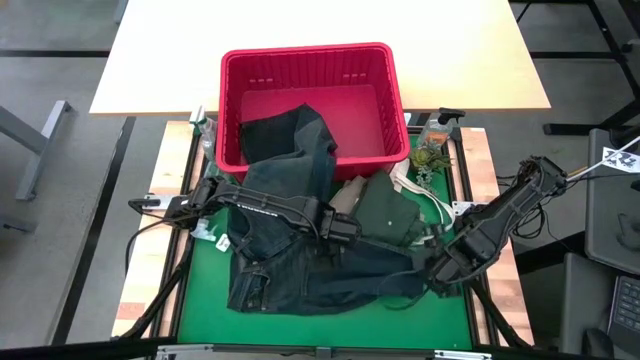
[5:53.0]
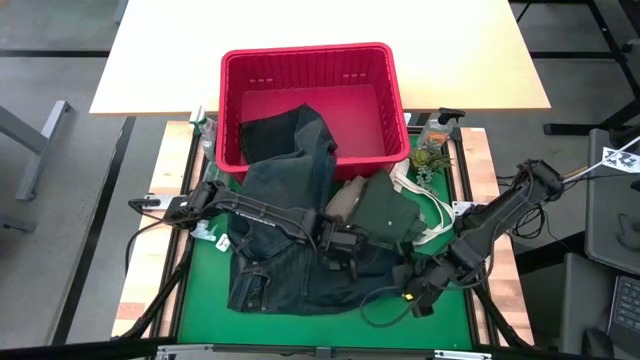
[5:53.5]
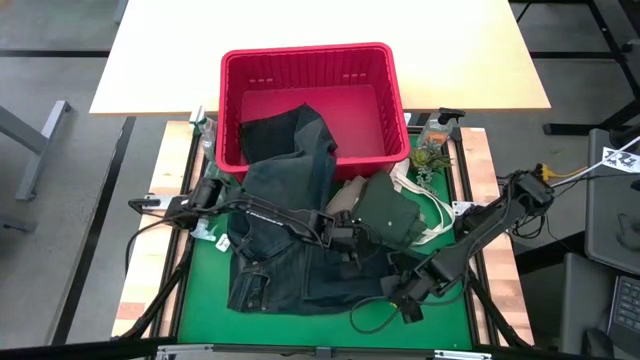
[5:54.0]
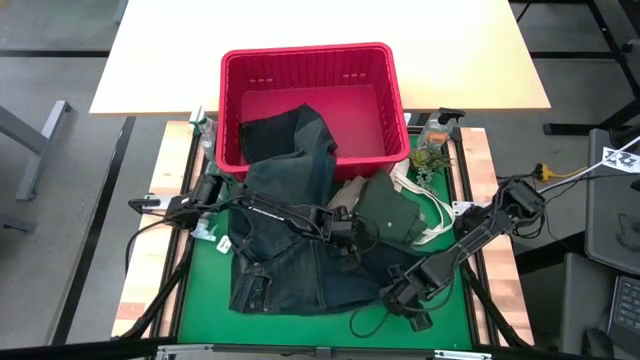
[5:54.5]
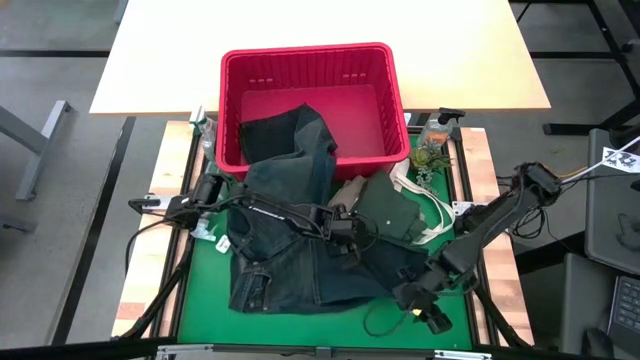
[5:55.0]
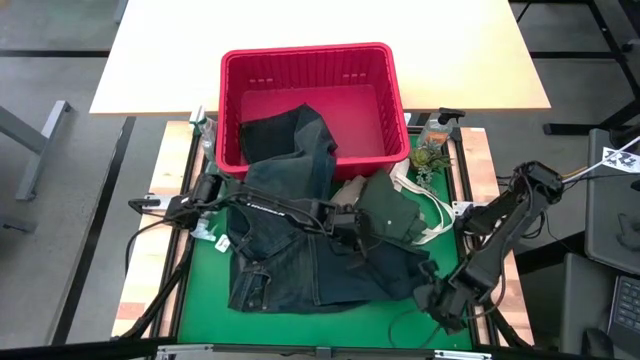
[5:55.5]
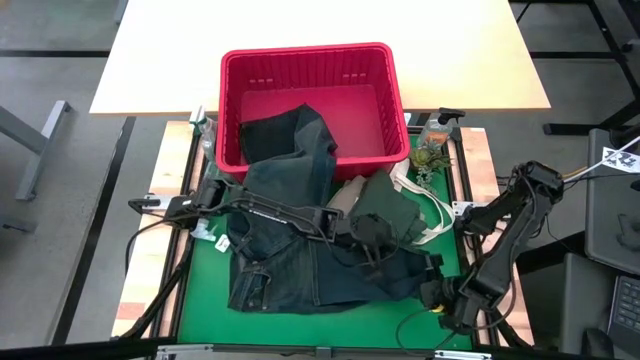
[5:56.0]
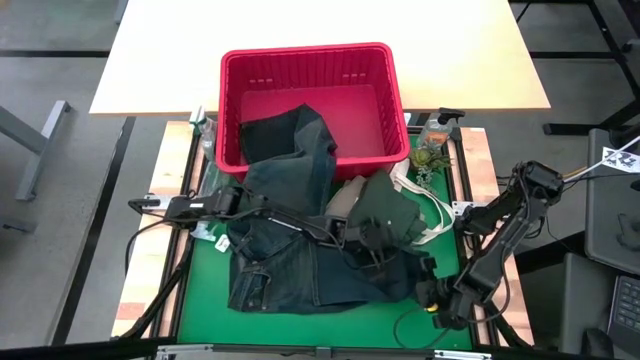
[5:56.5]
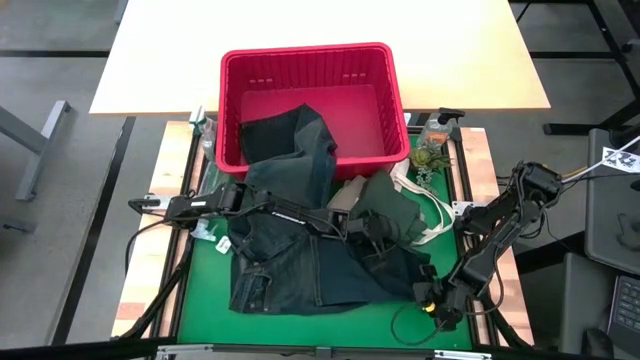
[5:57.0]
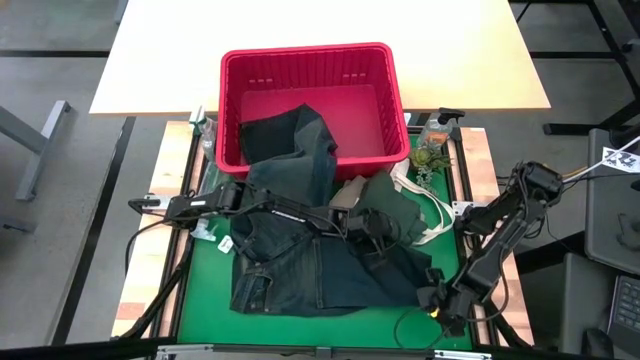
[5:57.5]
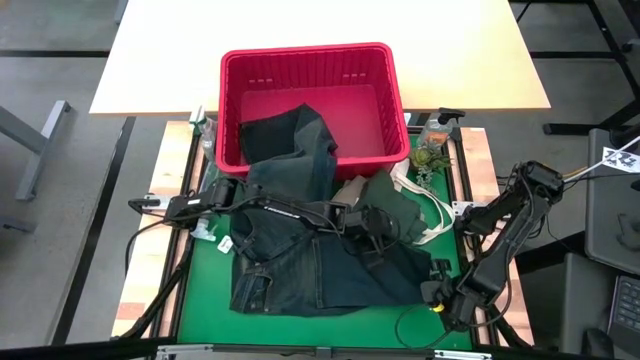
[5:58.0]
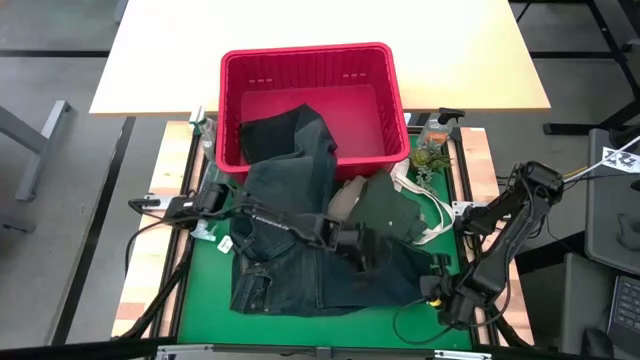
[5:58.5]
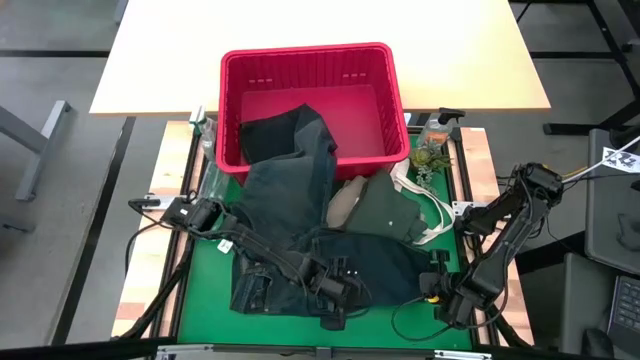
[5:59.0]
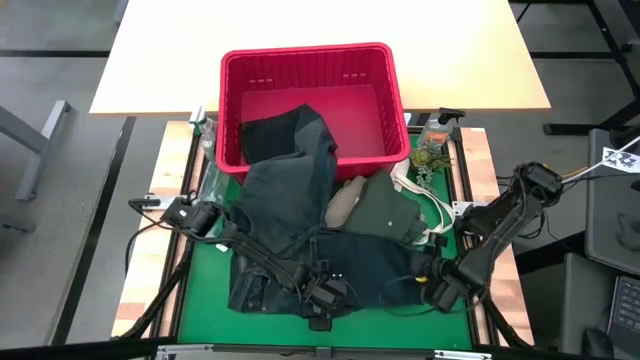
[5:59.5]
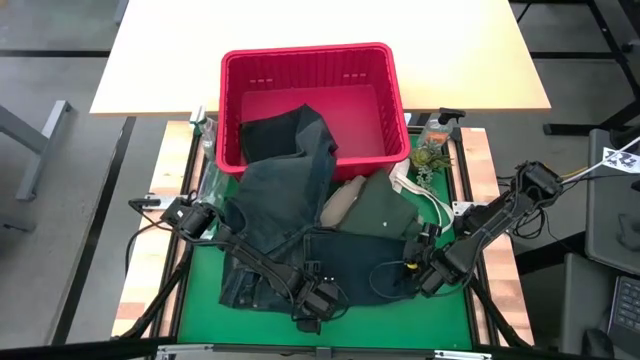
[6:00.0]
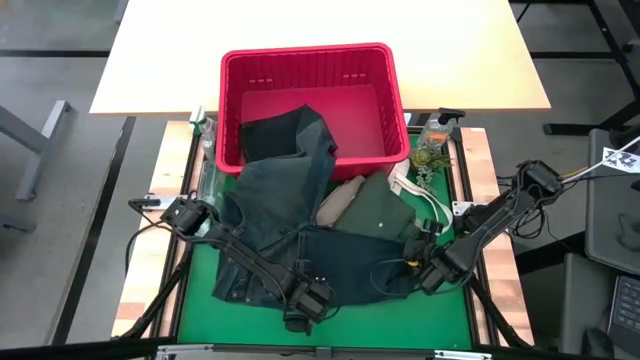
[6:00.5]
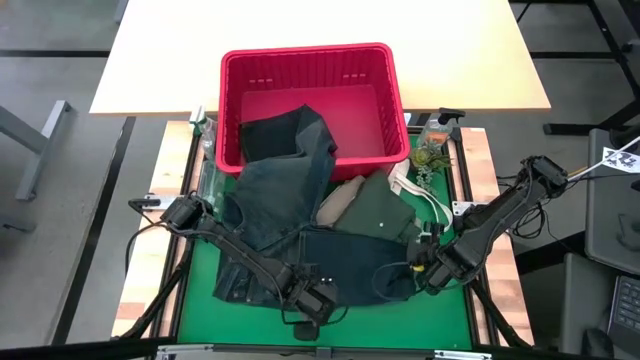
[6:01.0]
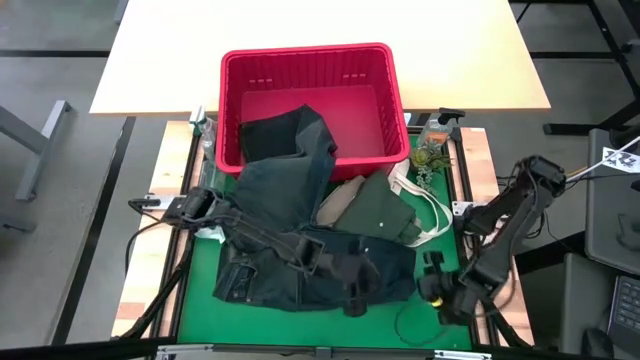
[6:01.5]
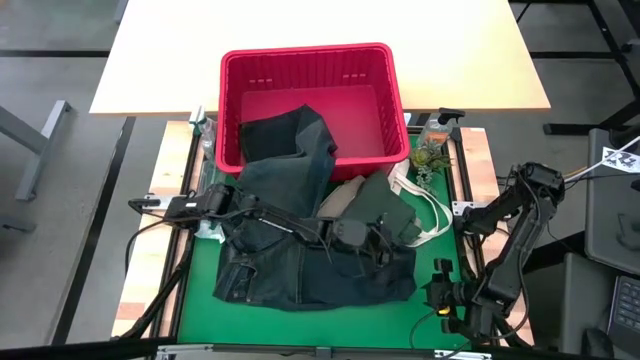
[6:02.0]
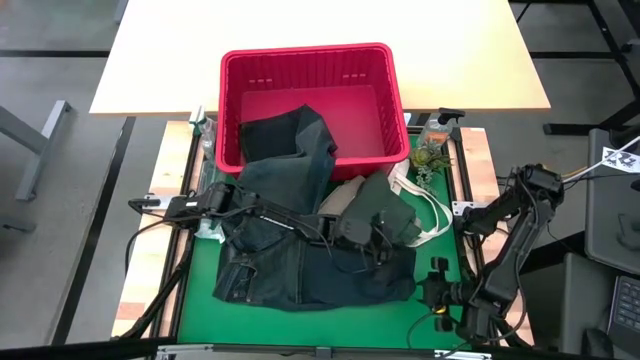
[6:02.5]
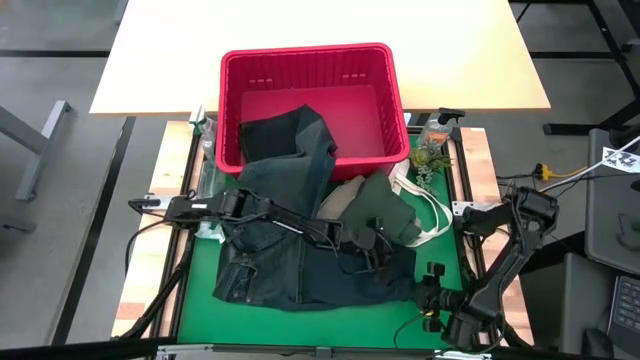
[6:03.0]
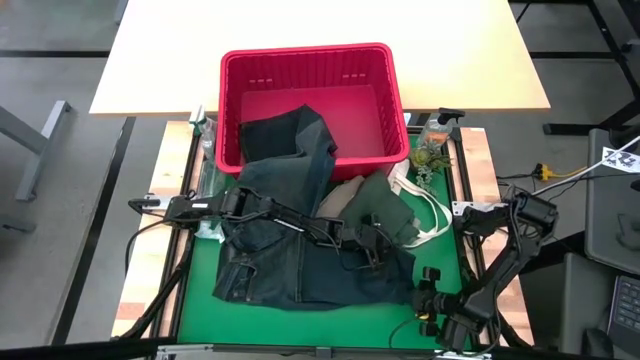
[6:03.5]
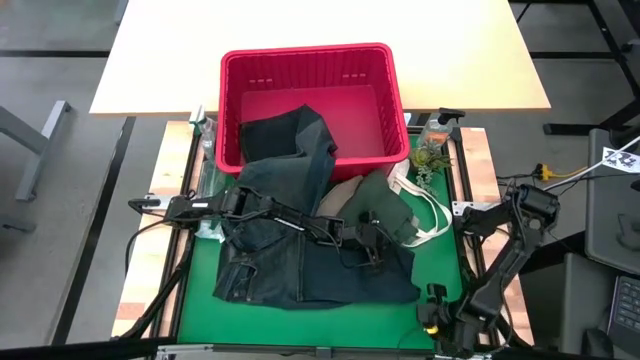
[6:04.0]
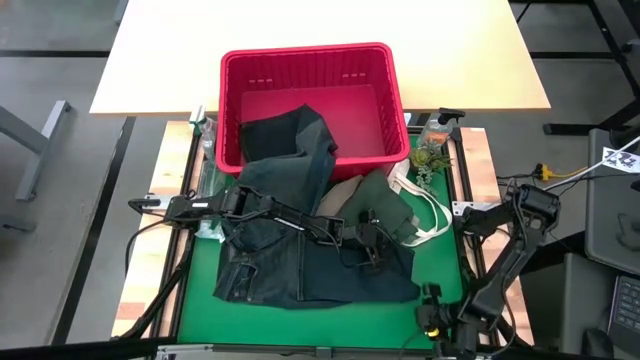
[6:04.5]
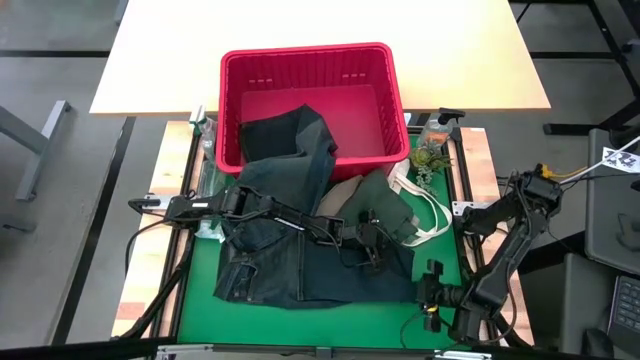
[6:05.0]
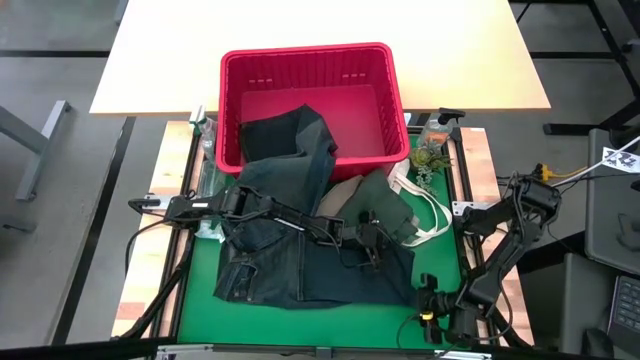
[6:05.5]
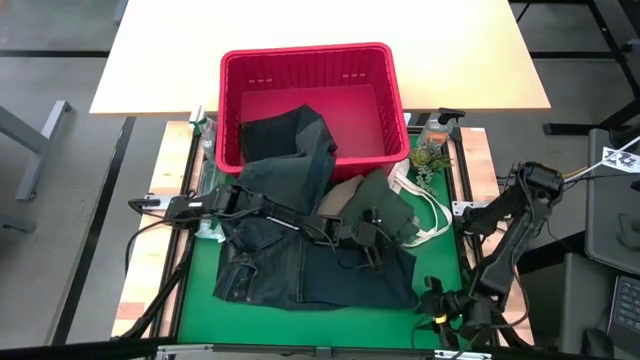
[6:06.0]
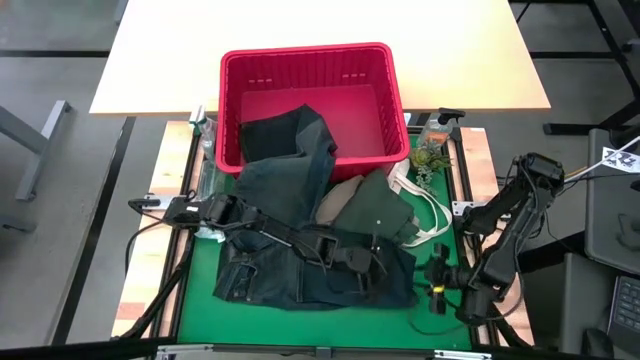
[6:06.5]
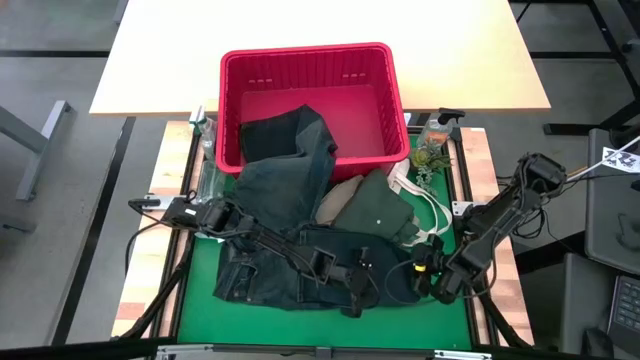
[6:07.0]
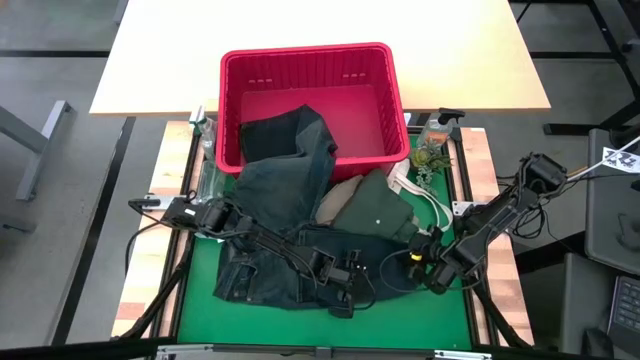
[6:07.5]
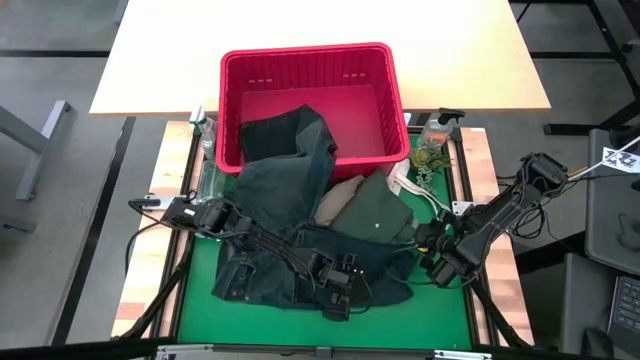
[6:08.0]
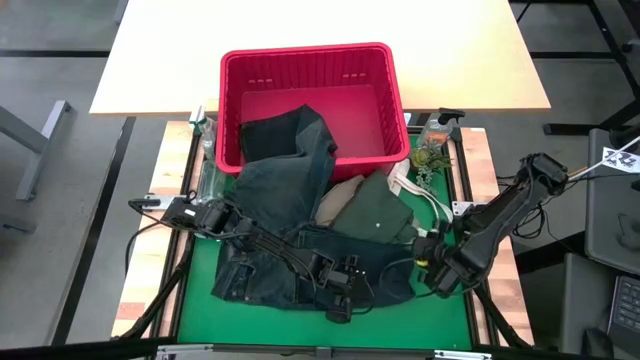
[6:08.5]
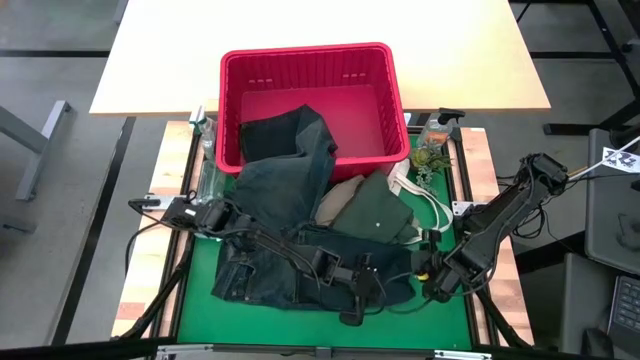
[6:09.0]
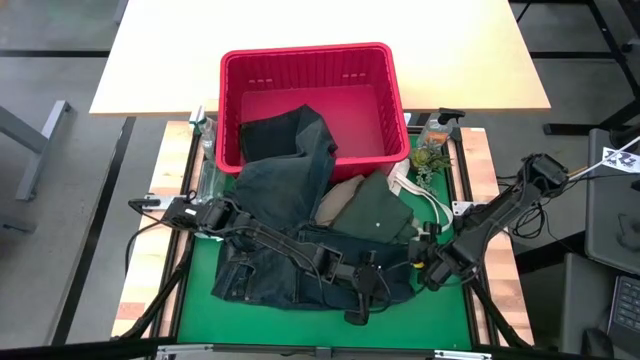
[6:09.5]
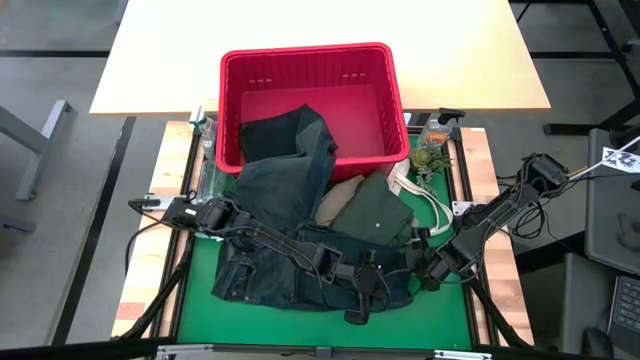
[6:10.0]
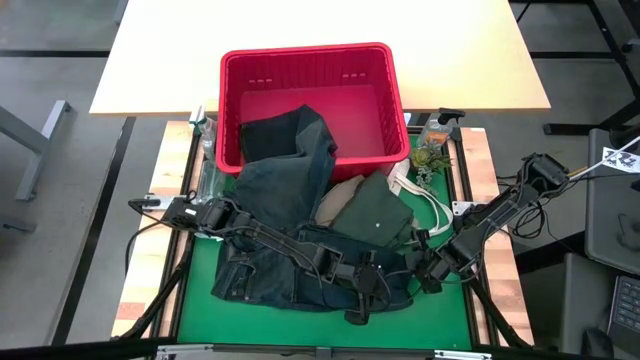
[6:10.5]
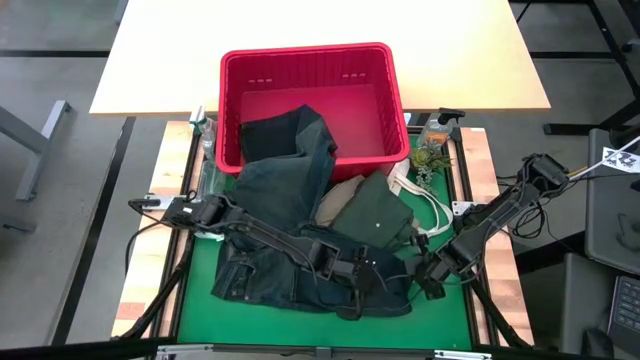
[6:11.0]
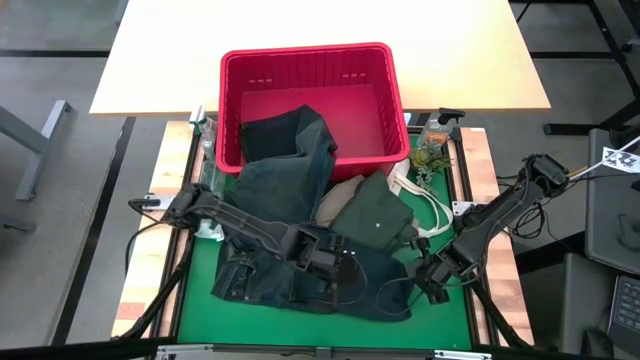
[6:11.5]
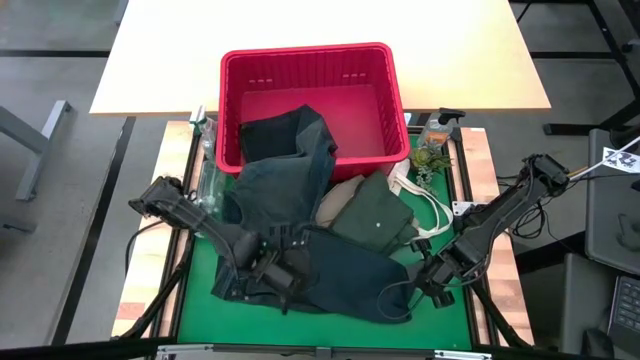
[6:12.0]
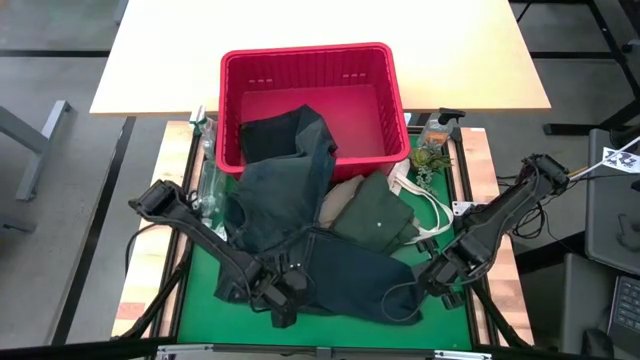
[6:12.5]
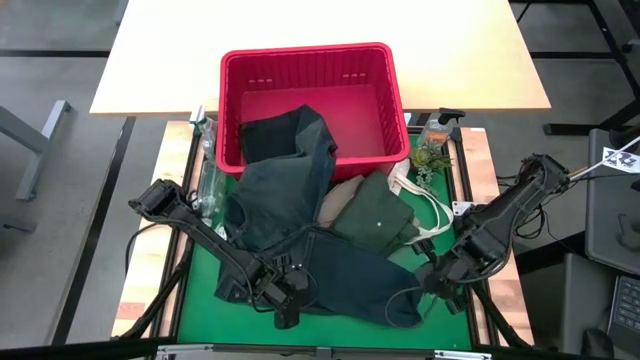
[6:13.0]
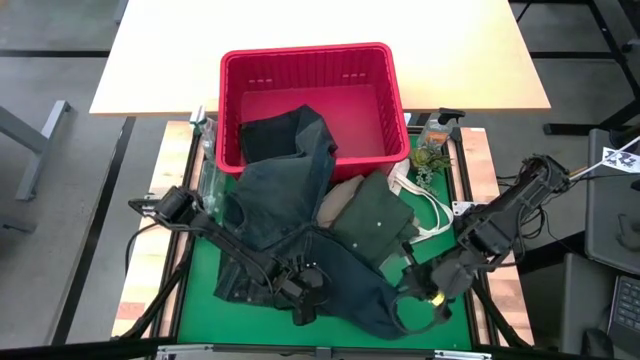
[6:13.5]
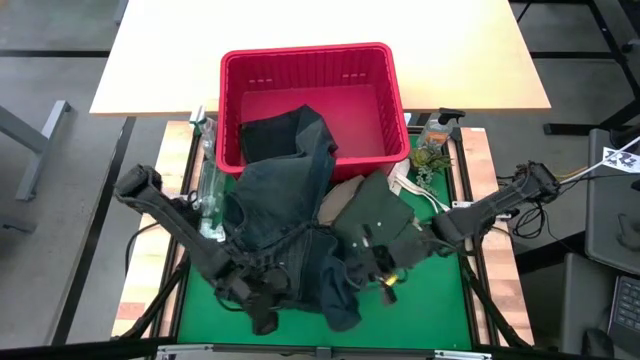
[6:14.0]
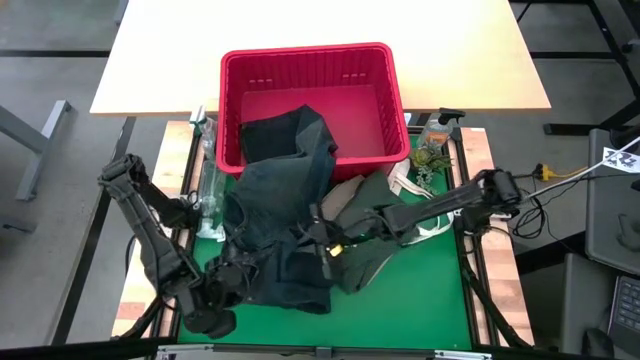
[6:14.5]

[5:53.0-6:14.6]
Task: Fold laundry
Fold the dark blue pants
